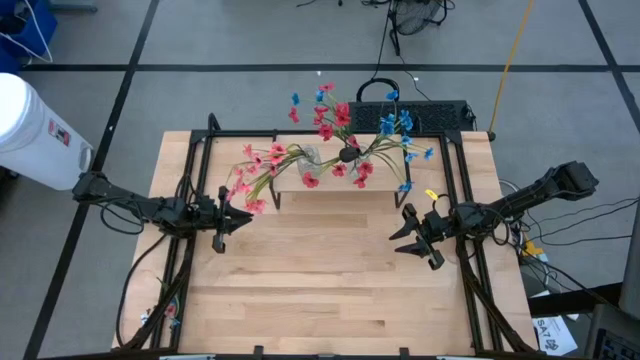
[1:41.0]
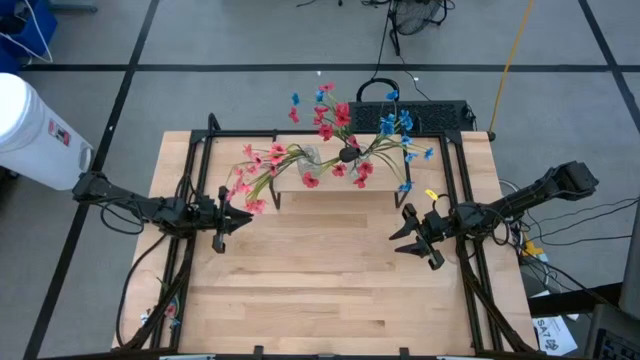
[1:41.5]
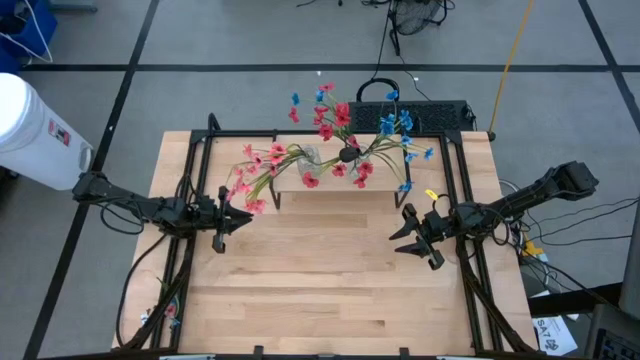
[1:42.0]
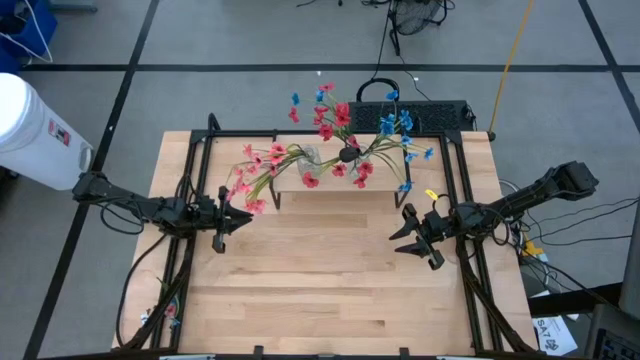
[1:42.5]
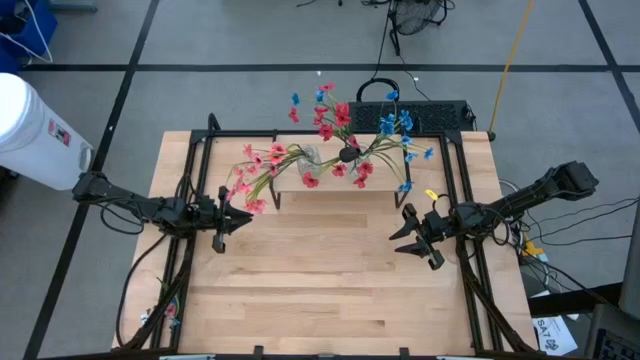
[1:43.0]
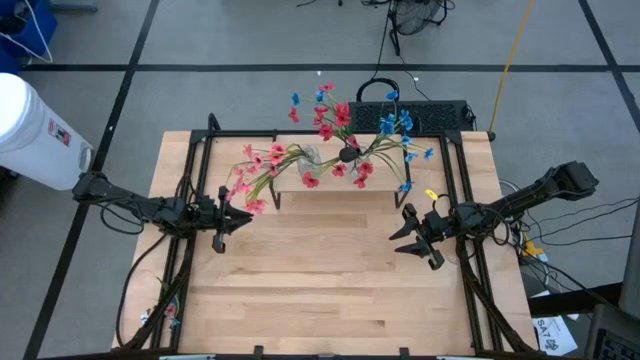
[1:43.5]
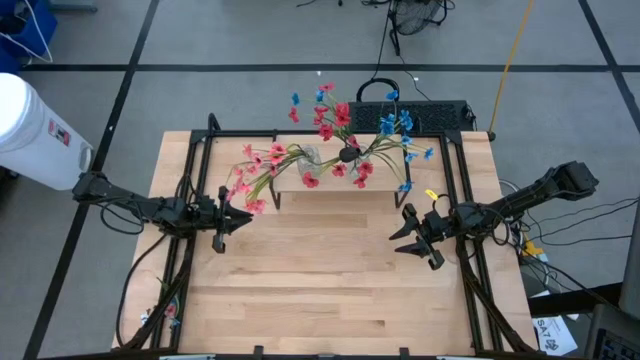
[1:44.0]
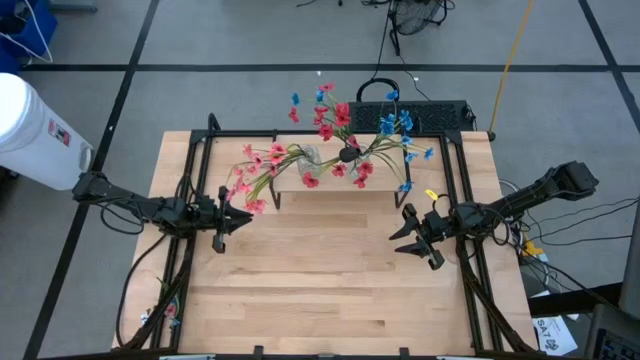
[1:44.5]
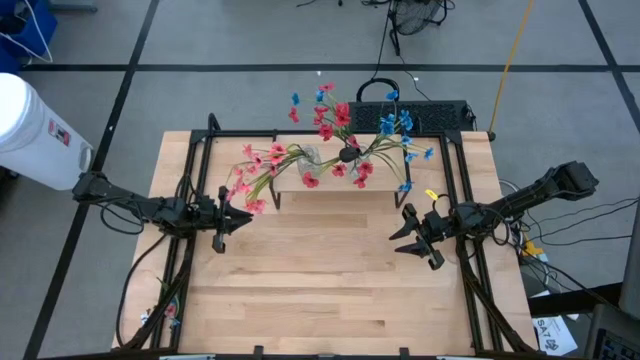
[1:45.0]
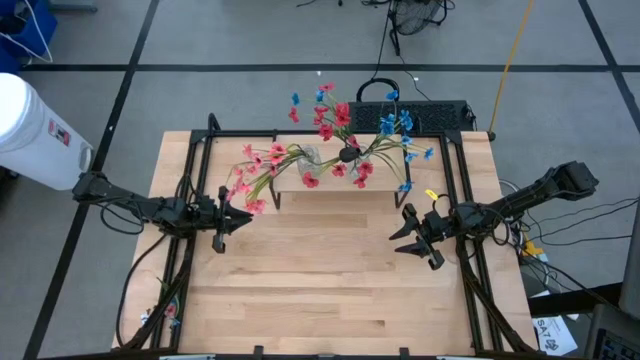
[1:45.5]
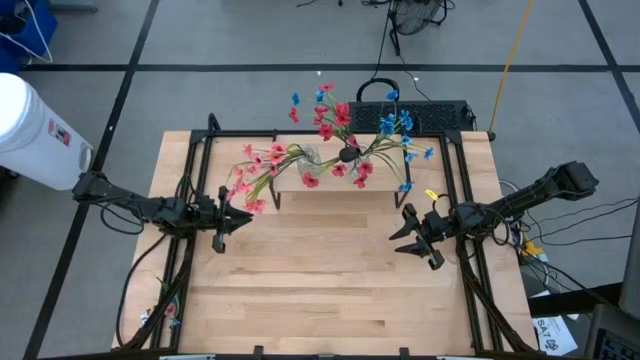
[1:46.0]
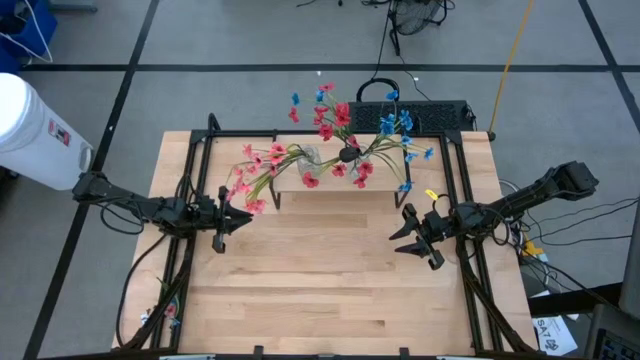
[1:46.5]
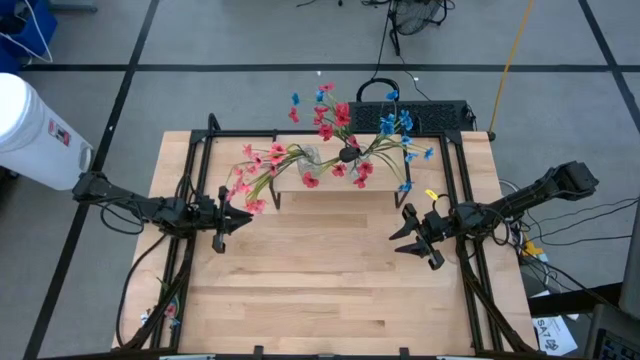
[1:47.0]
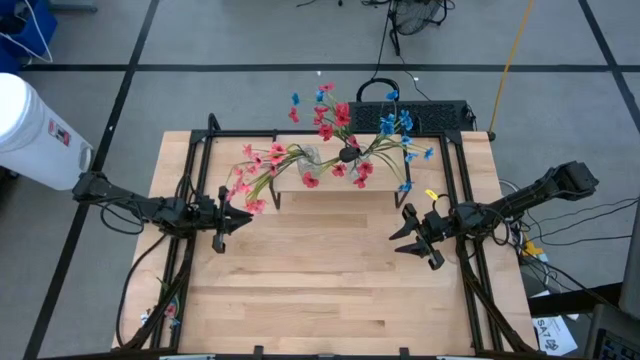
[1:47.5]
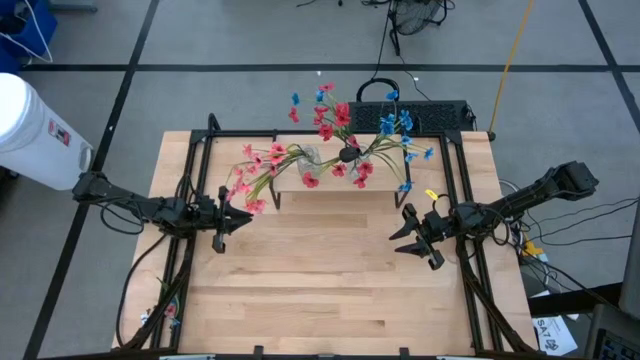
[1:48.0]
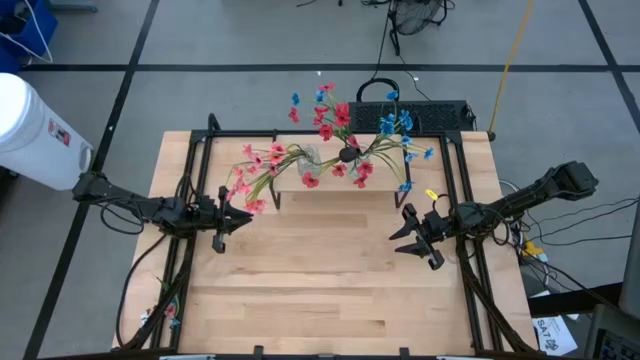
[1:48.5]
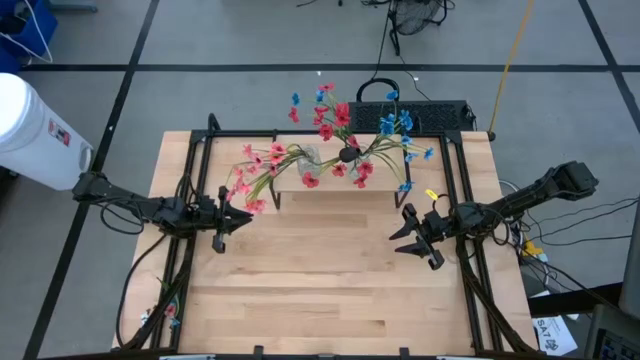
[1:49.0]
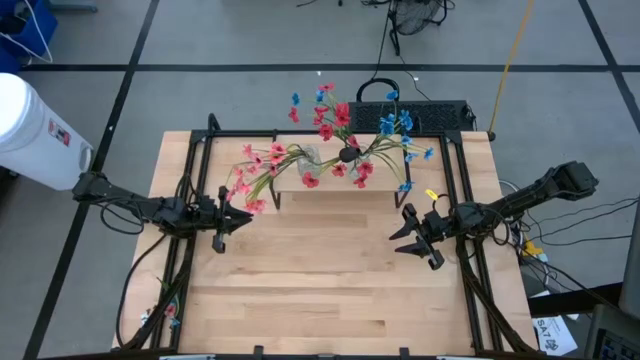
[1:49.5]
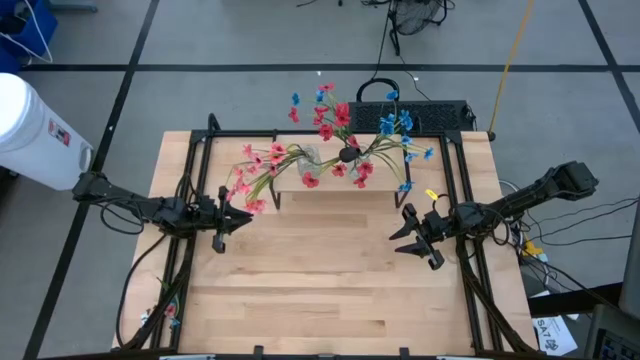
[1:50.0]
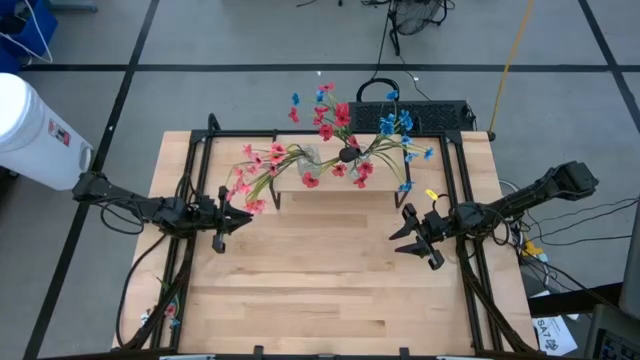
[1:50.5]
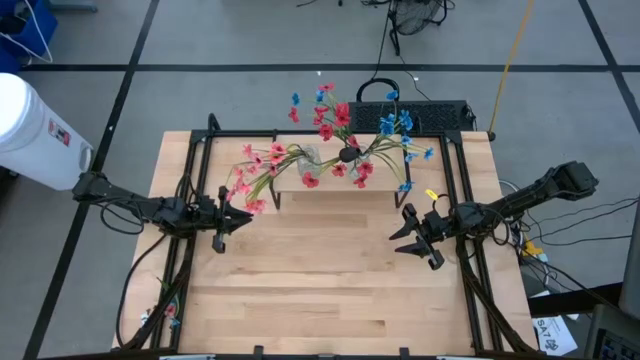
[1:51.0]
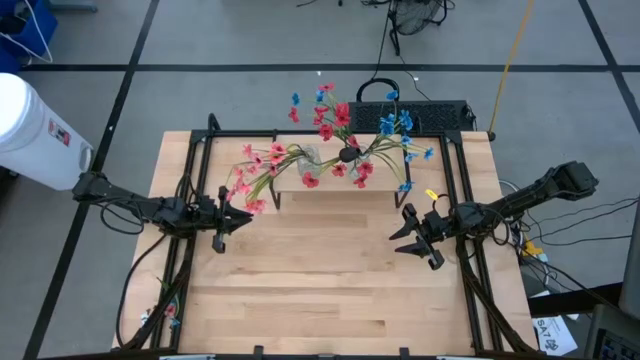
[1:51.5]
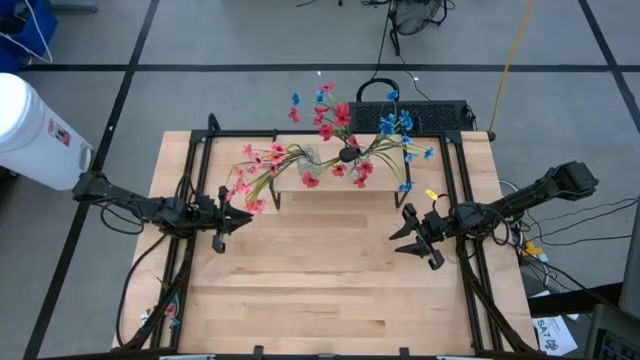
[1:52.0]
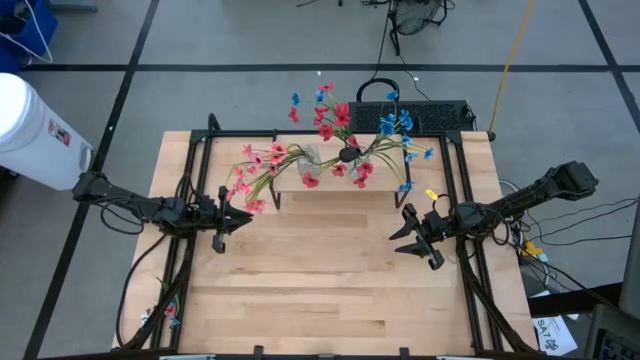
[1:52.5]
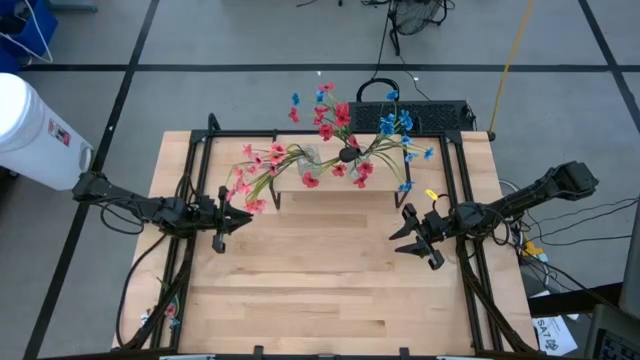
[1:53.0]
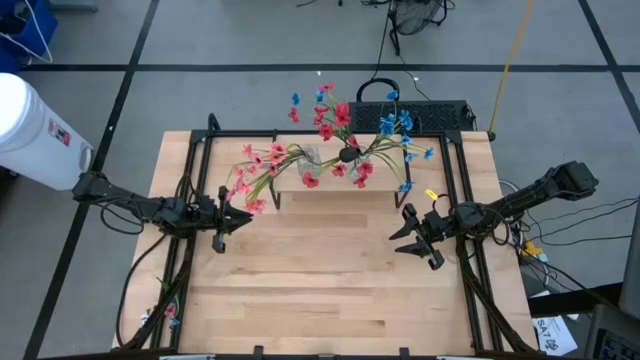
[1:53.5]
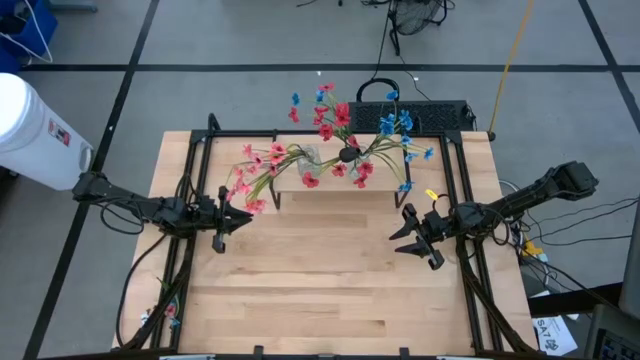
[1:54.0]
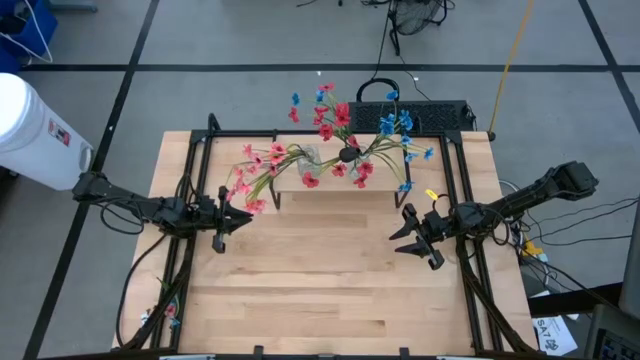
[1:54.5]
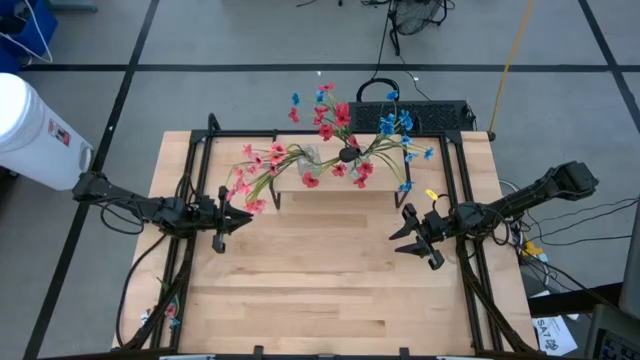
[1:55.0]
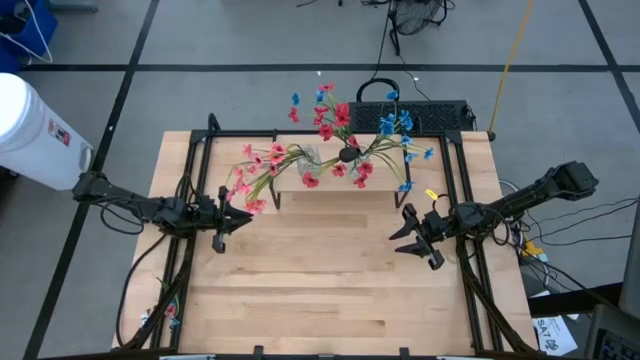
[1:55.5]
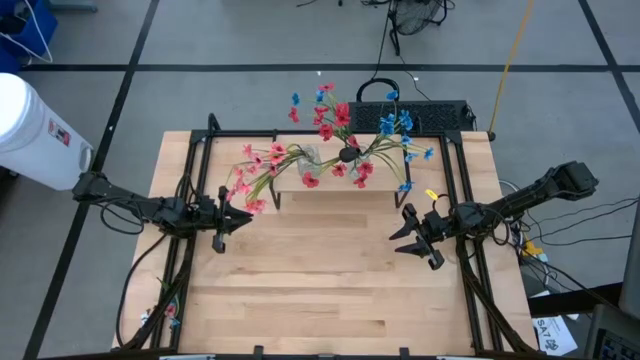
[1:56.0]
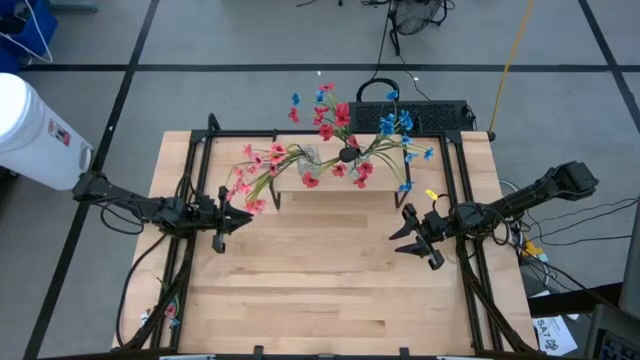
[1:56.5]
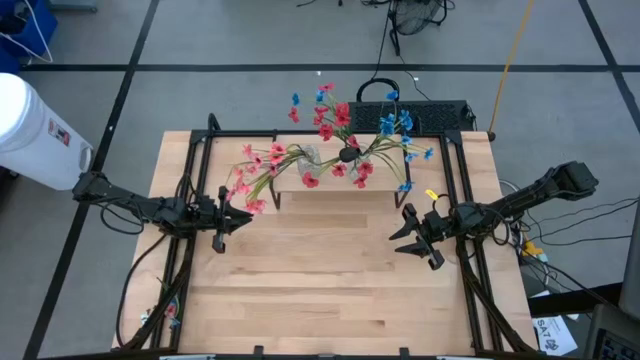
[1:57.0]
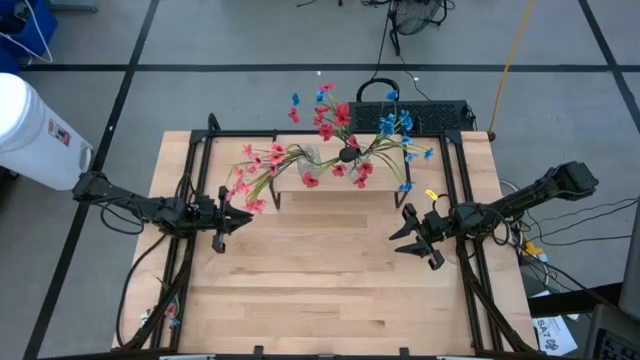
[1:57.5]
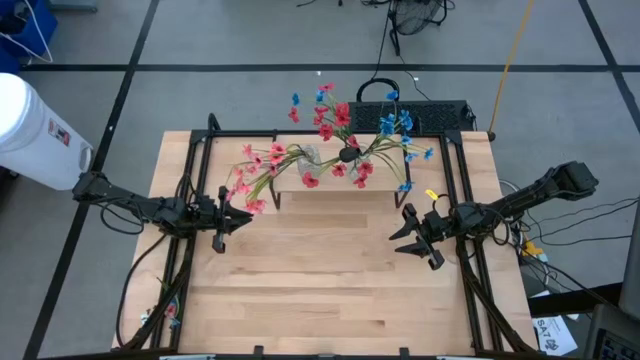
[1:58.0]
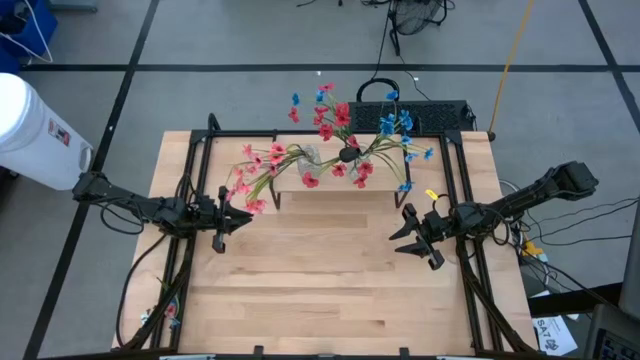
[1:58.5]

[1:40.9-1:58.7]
Task: Pick and place flowers into a vace then onto a shelf
Return to Home Position

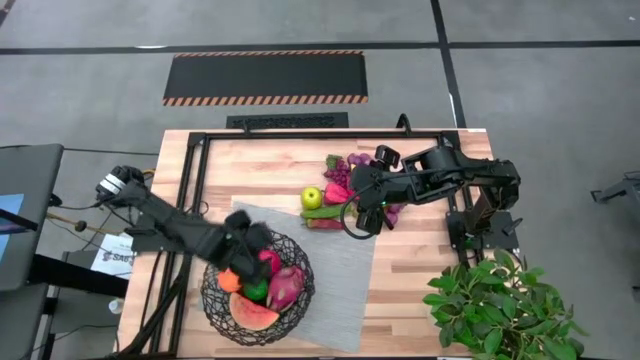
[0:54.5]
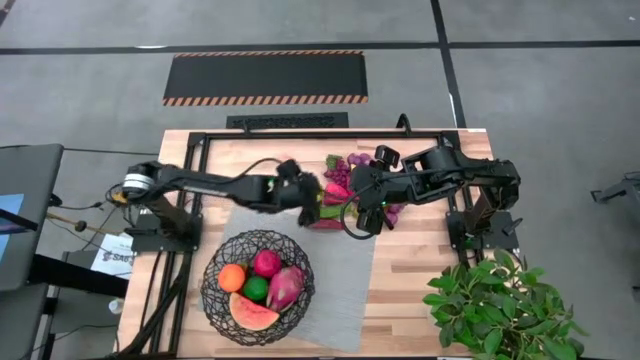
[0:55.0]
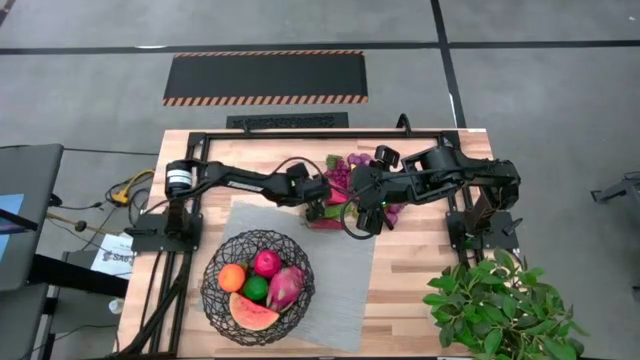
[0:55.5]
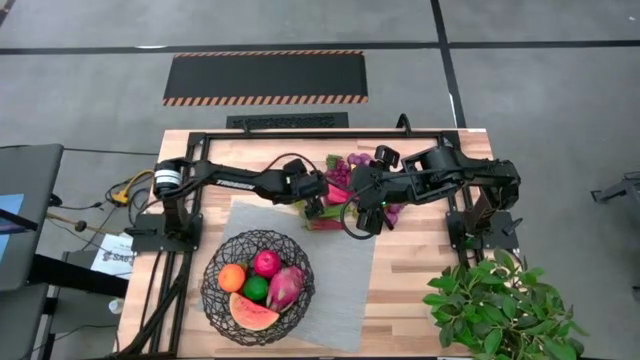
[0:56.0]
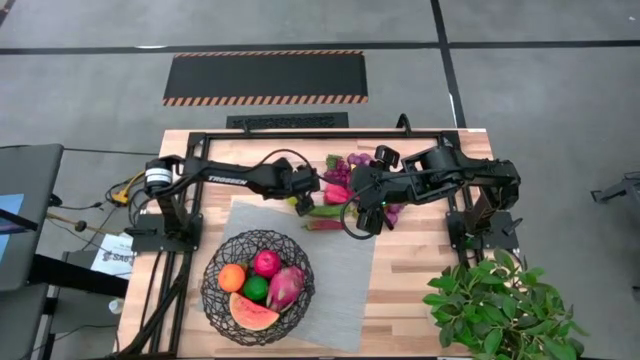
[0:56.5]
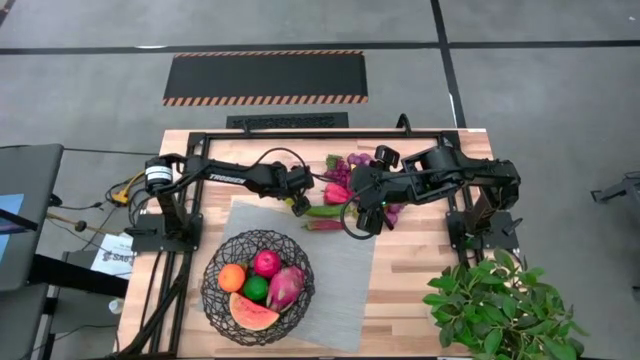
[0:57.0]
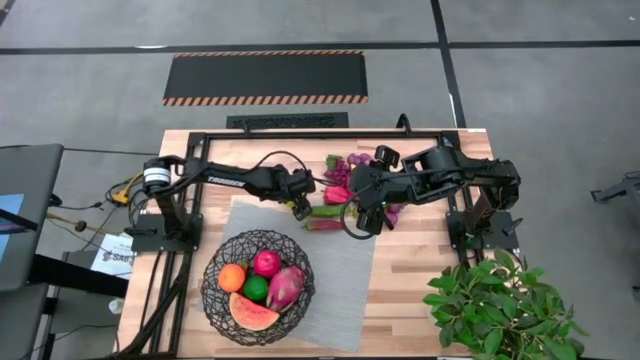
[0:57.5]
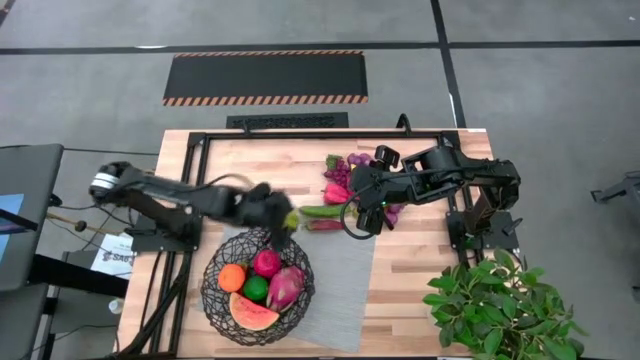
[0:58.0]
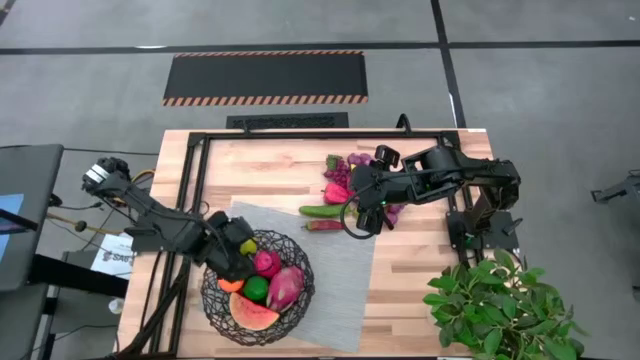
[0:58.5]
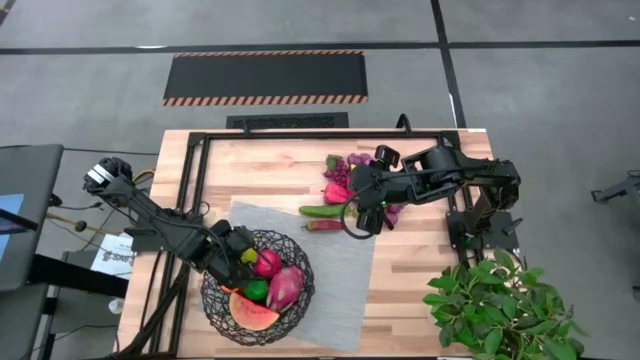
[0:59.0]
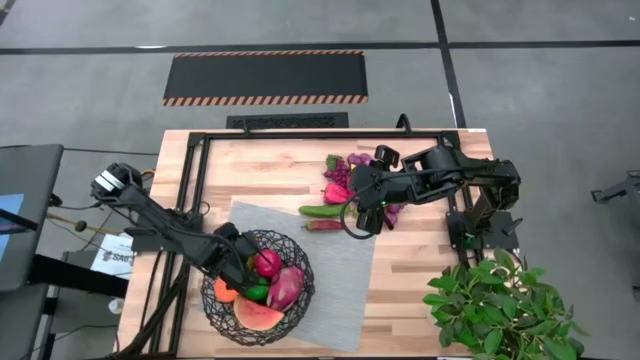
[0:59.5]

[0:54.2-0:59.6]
Task: Build produce basket
Put the green apple into the mesh basket
